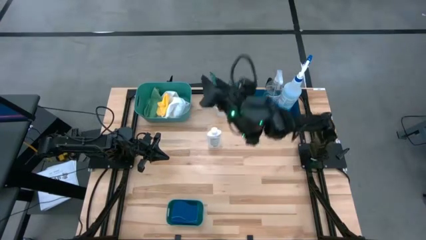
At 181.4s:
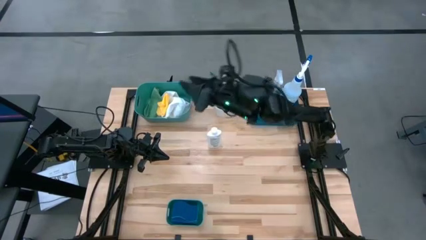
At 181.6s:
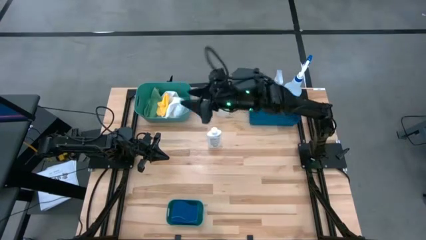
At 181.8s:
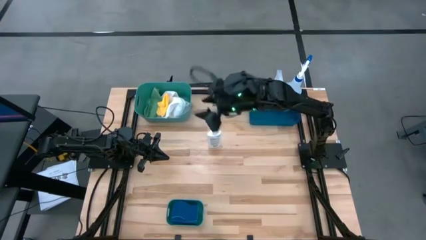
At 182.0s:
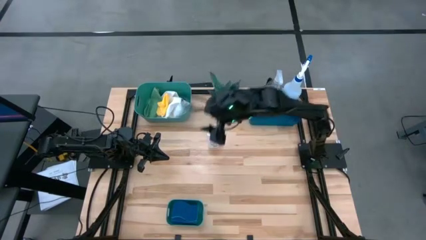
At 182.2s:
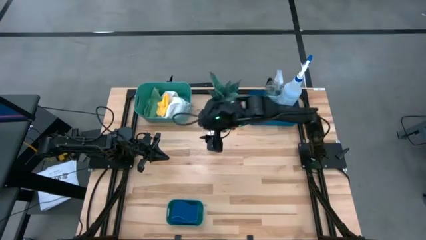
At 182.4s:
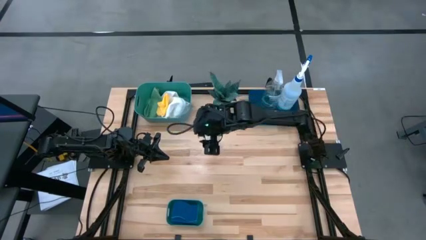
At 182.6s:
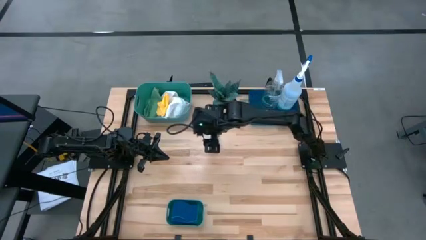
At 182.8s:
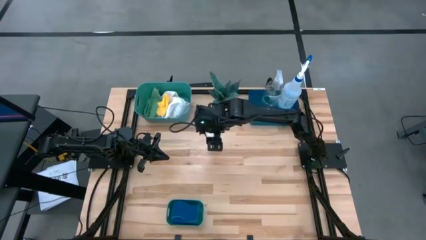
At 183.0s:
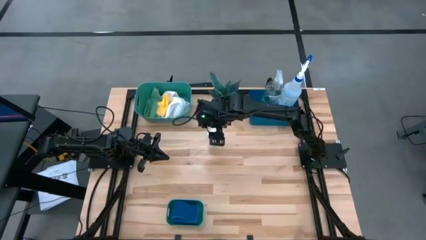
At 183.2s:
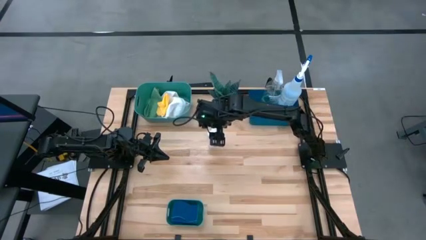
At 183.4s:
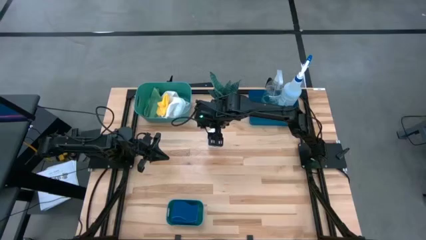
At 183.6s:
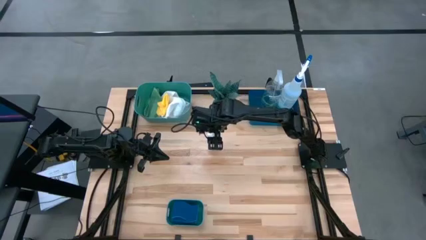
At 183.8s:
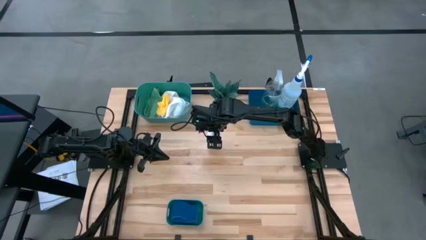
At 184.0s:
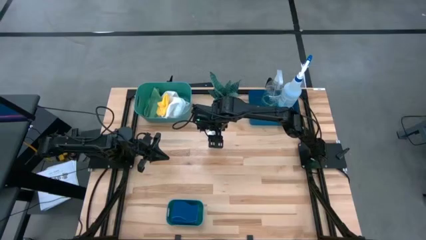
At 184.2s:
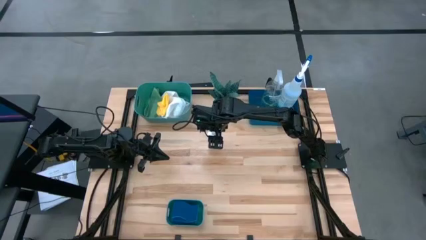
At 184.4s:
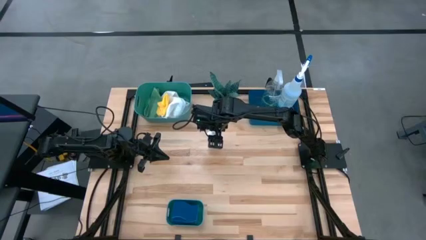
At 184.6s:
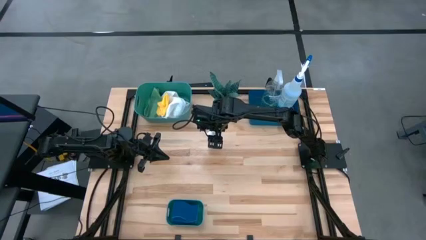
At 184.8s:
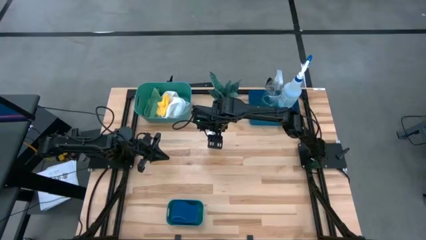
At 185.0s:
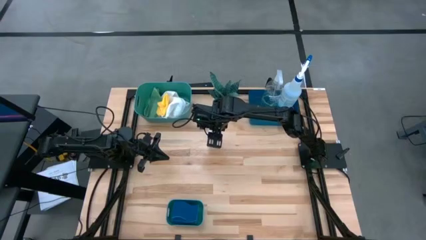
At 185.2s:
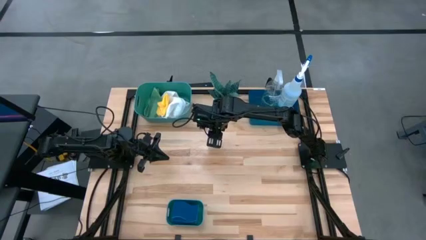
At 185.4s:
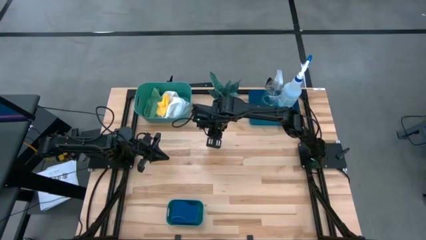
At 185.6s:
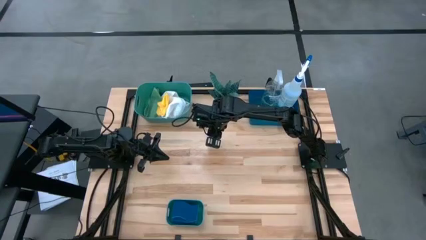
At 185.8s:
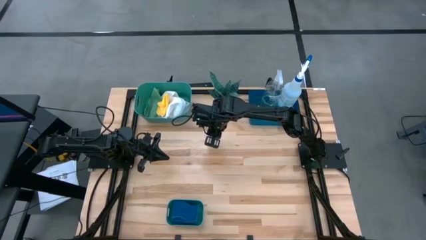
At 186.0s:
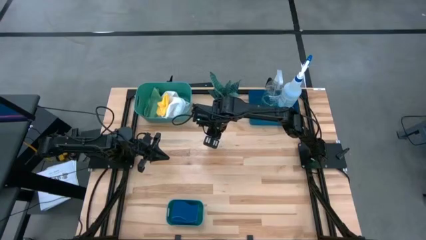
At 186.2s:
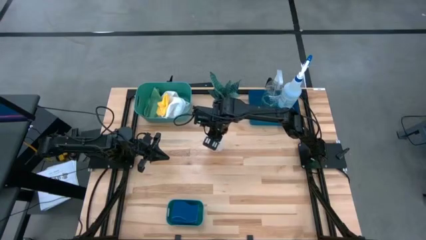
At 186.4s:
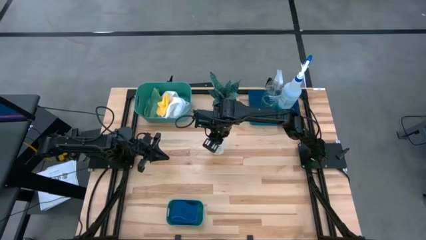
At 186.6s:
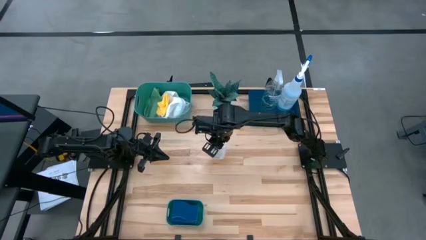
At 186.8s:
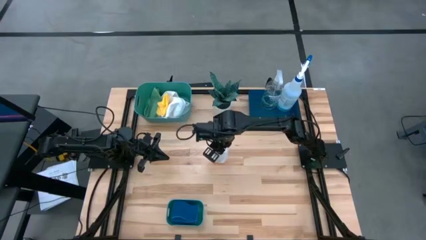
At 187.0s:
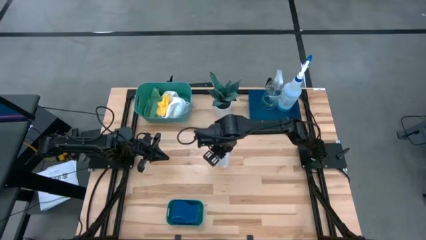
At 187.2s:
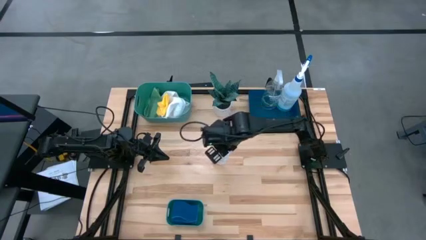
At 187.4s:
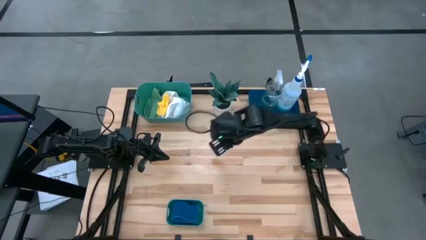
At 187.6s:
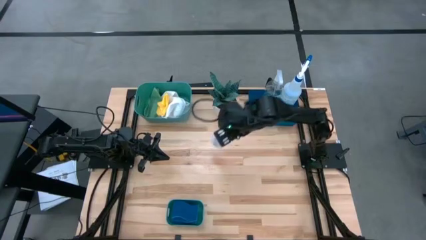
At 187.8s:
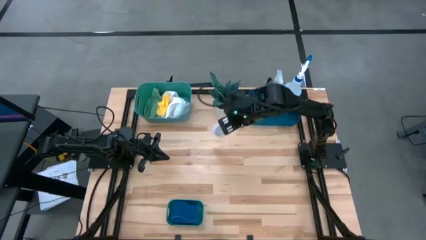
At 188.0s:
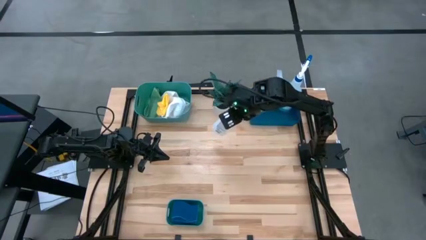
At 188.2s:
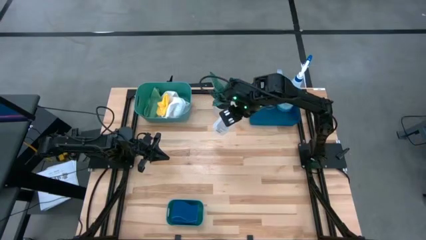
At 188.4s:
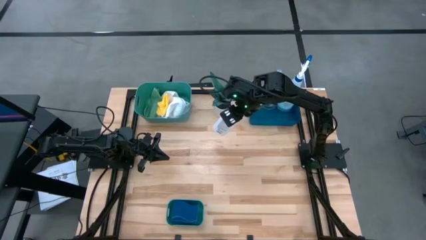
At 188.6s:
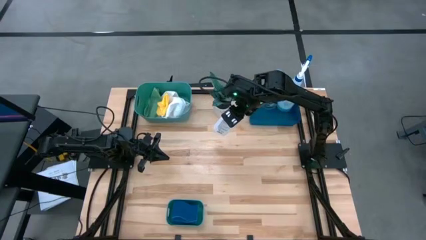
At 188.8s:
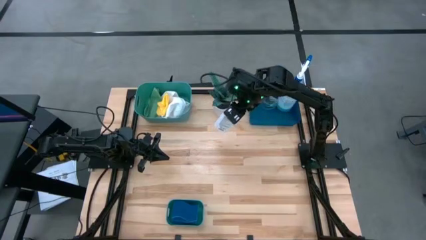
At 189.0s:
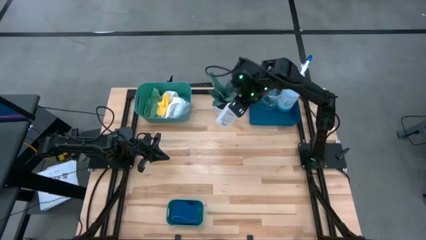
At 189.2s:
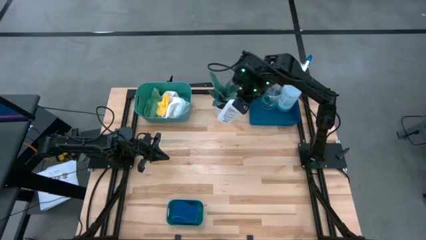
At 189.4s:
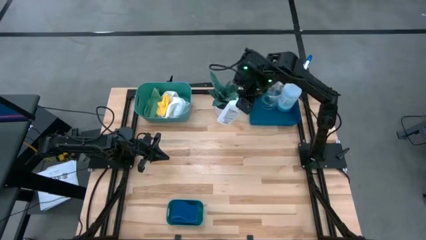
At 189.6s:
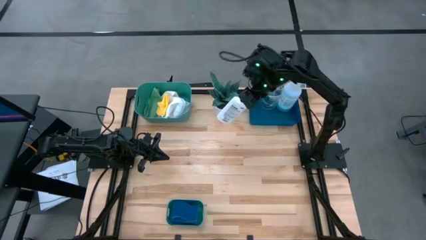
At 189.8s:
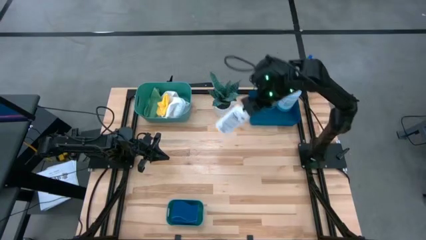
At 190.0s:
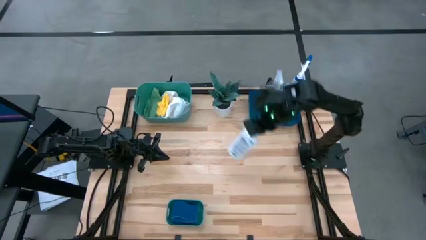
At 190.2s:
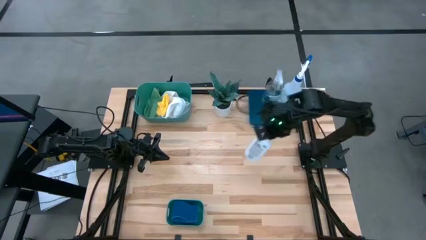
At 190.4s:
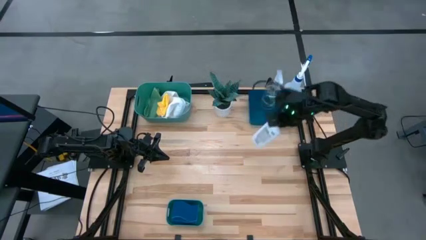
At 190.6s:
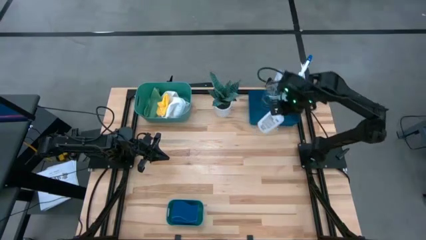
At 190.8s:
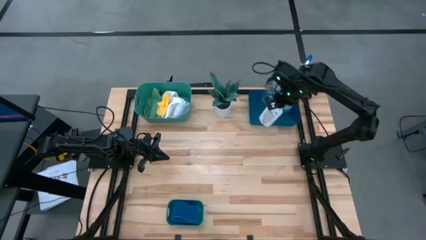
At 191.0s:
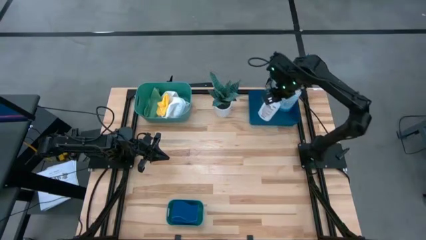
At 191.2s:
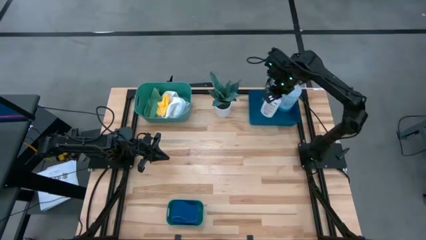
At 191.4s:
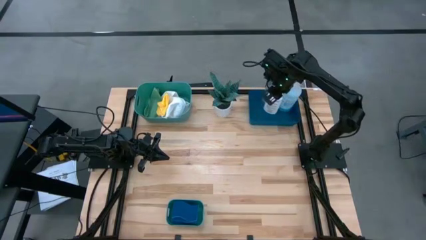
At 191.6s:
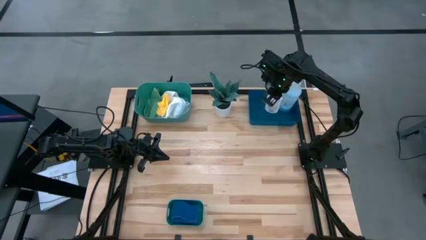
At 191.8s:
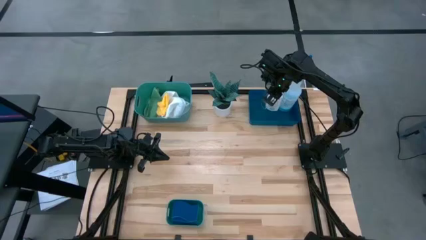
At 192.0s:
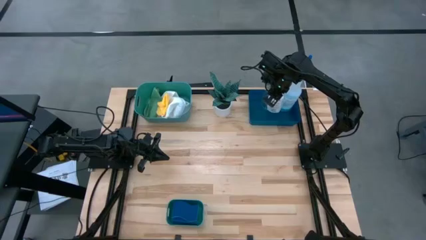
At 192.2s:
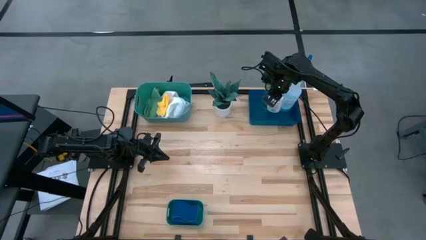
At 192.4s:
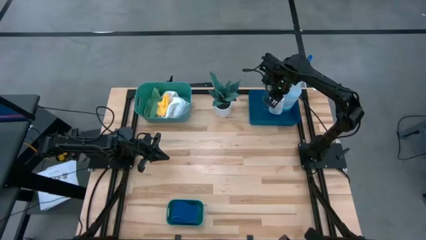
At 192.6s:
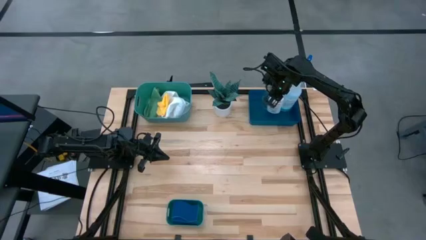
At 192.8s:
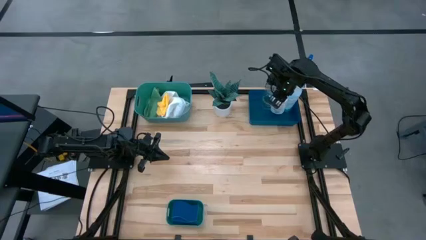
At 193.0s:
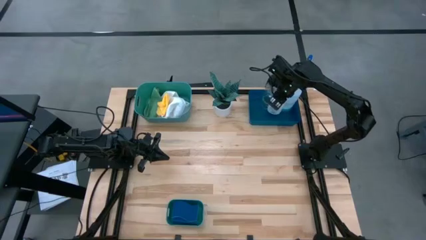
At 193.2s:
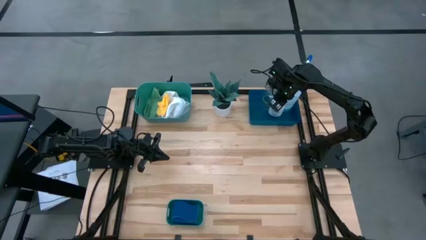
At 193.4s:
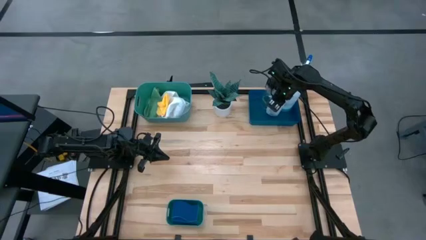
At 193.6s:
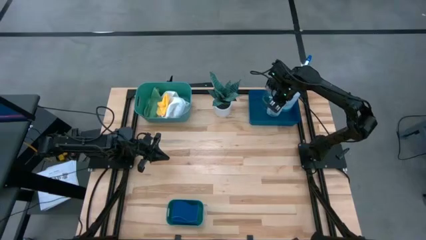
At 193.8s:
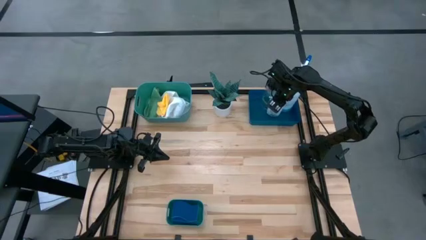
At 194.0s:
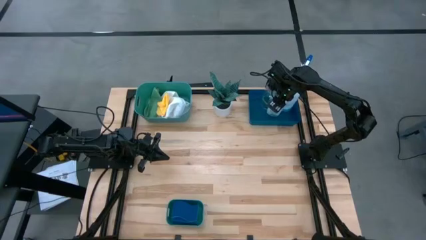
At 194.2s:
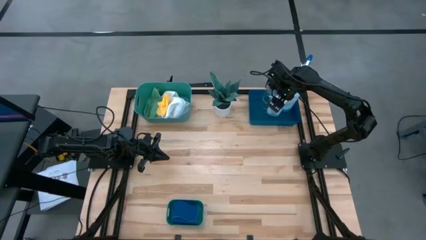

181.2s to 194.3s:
Task: Pick & Place Kitchen Items
Put the white plastic restorer bottle into the blue bin

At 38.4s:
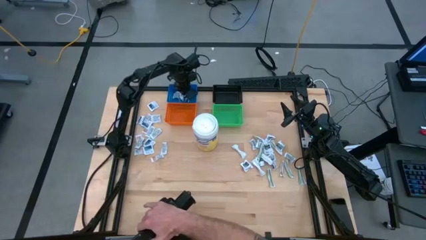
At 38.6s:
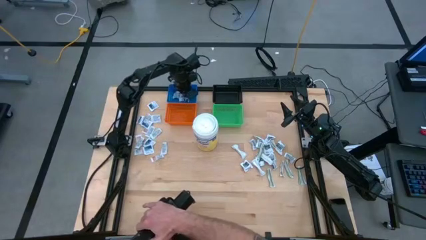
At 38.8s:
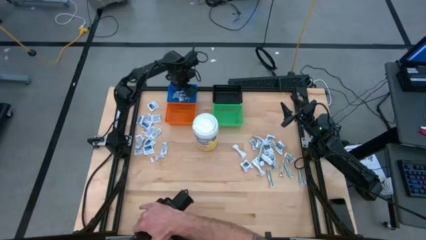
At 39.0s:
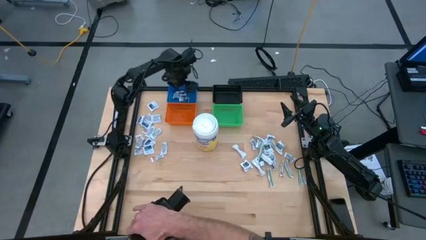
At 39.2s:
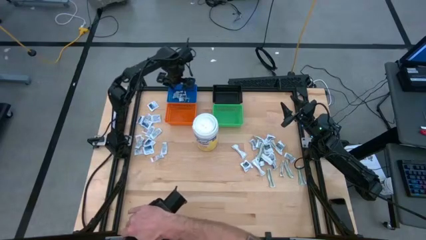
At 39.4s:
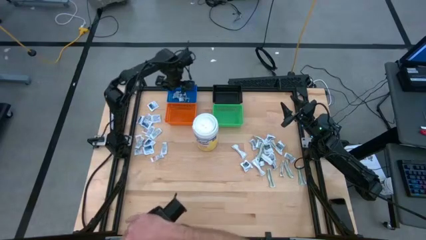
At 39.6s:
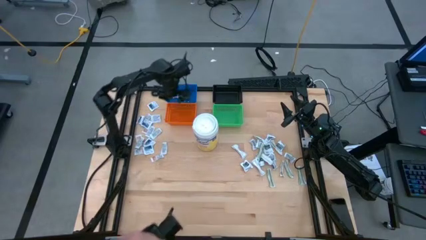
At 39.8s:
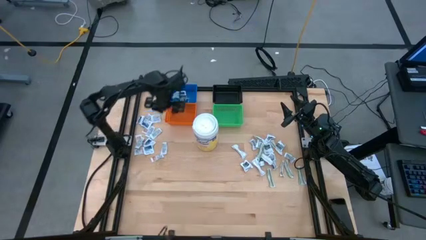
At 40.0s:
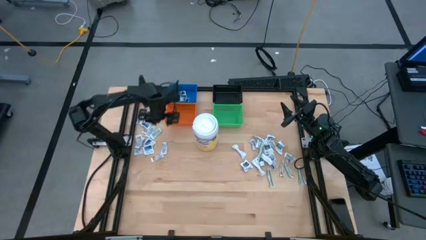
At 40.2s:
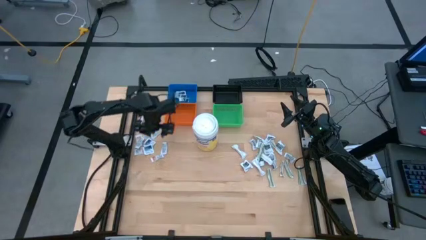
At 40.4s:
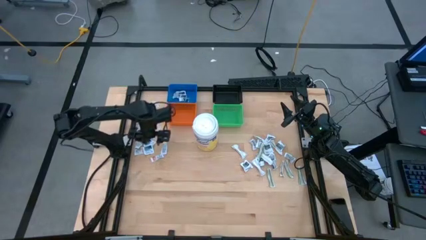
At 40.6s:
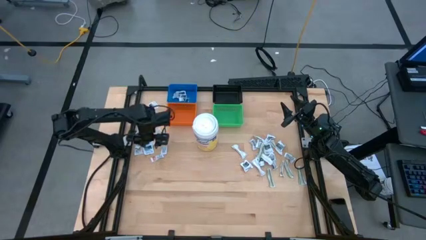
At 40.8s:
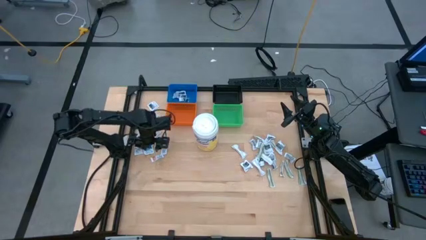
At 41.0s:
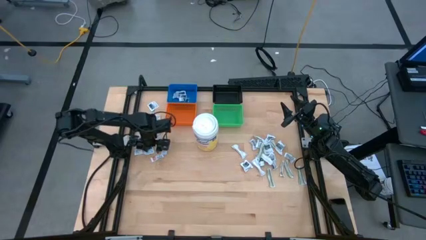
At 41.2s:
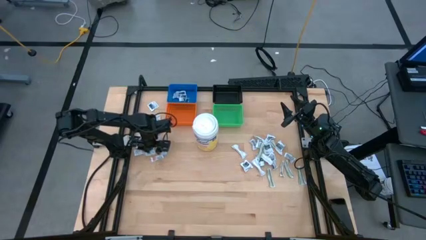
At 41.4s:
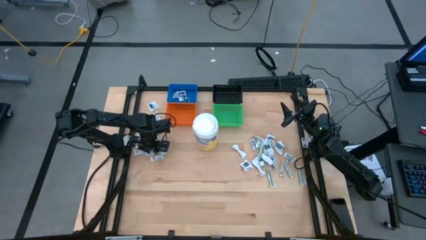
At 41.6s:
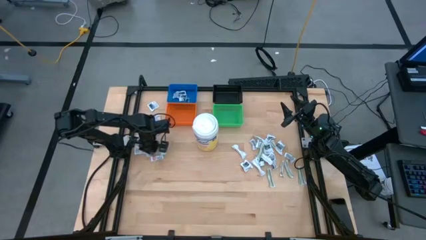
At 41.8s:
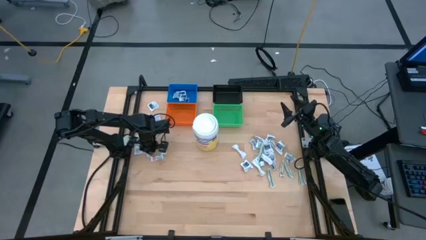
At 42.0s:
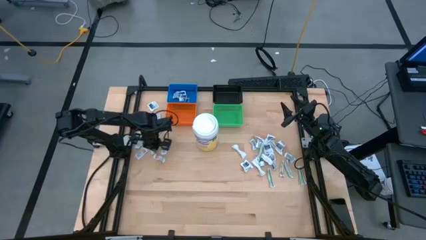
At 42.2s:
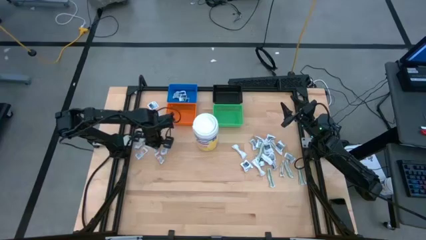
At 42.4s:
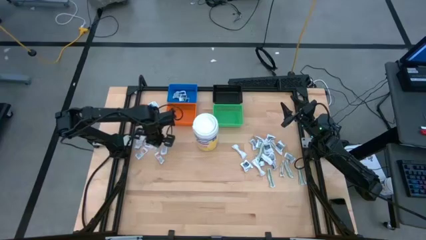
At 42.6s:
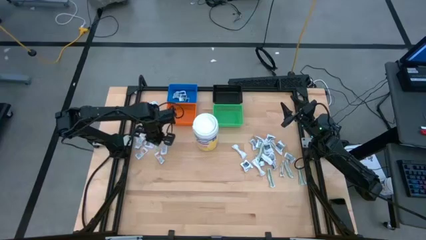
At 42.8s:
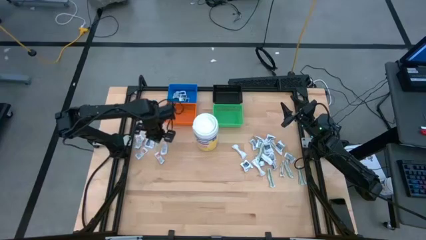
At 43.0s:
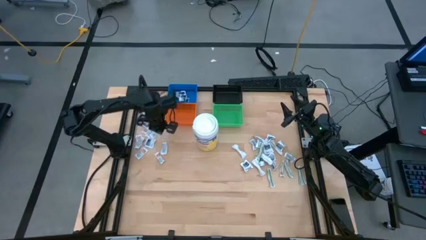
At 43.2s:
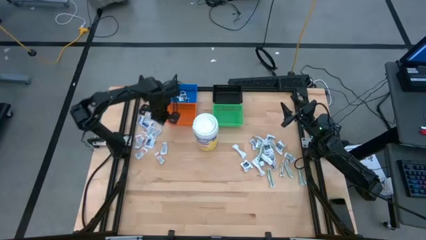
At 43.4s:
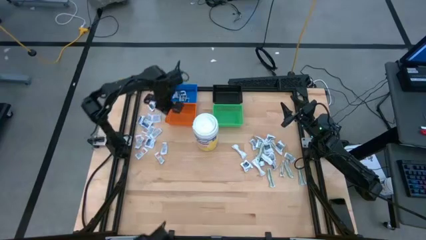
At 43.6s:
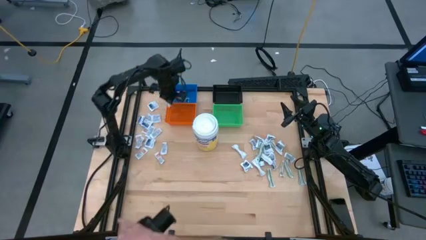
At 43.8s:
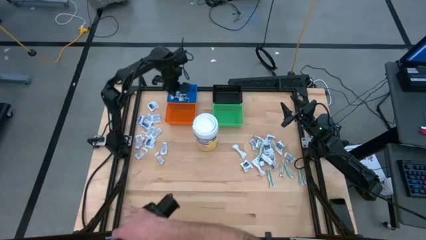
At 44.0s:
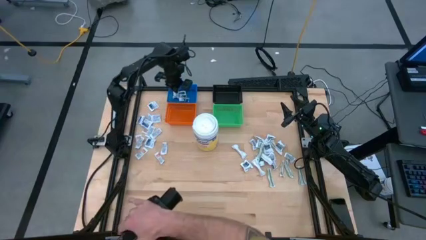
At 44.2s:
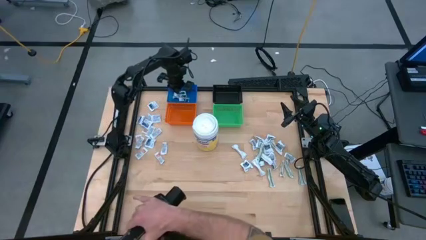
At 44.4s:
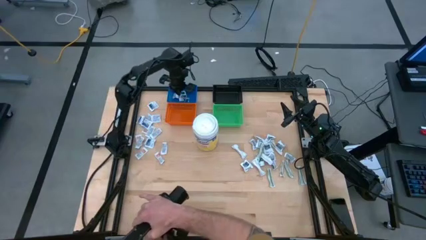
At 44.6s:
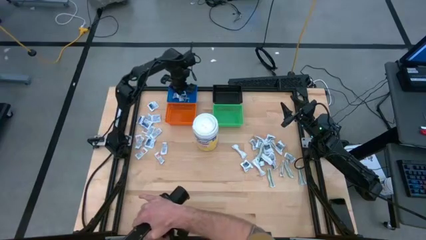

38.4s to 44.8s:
Task: Pick & Place First Aid Supplies
Put the blue alcohol pad into the blue bin
